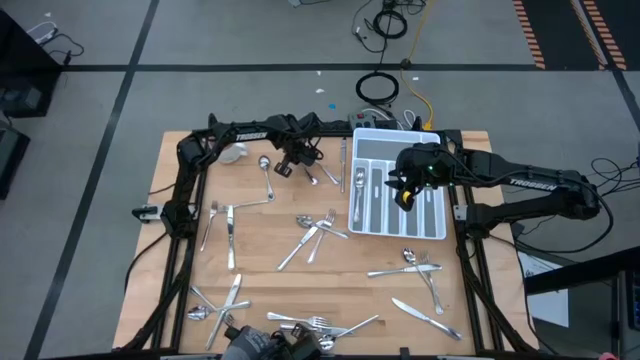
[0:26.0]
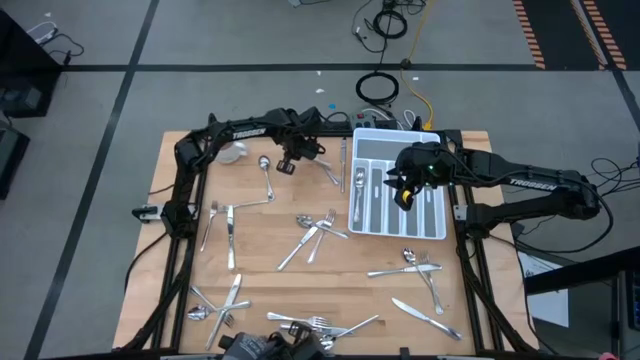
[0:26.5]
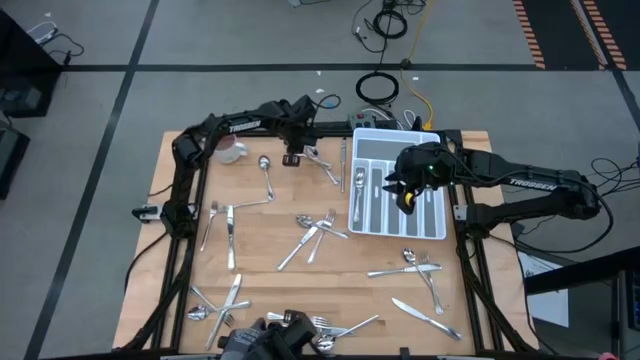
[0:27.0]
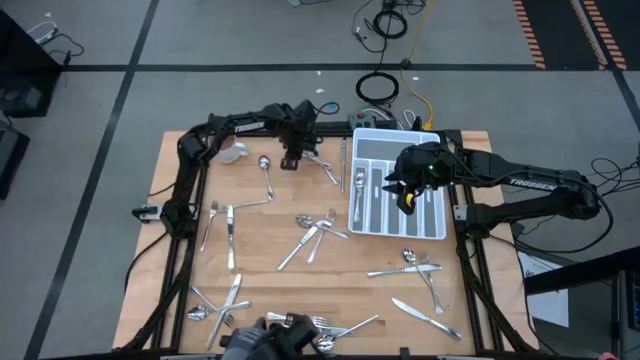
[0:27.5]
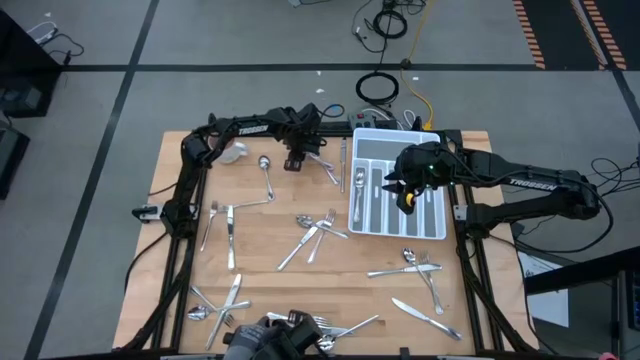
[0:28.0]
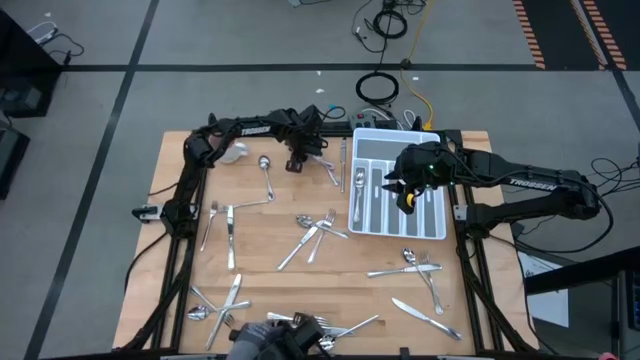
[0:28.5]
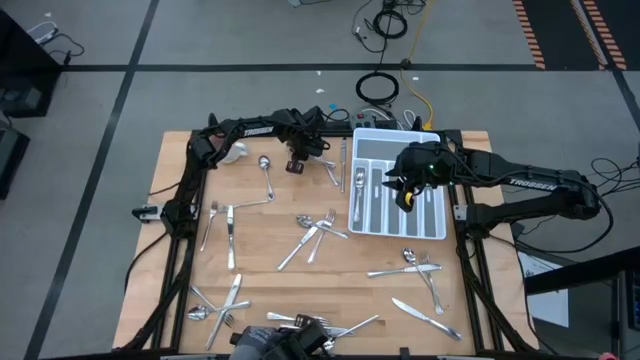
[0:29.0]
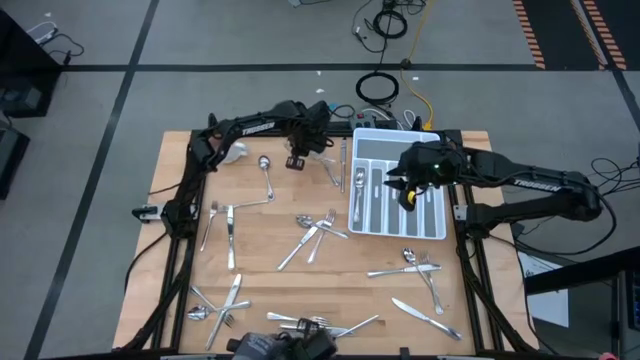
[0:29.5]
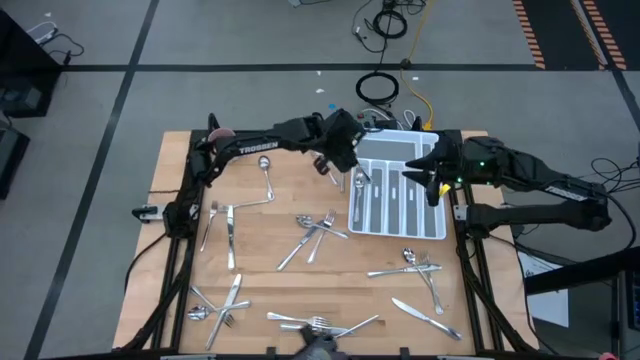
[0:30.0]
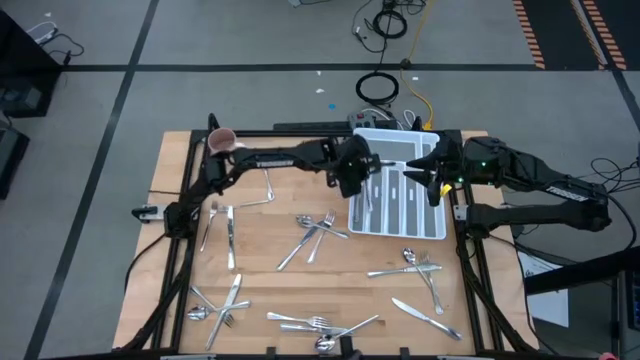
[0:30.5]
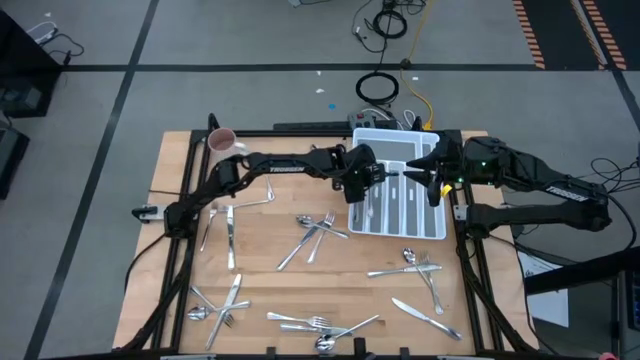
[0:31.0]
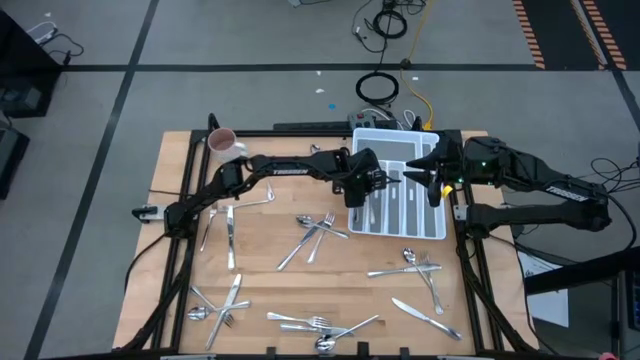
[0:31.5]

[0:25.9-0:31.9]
Task: Sort silverware
Put the silver fork into the silverware tray

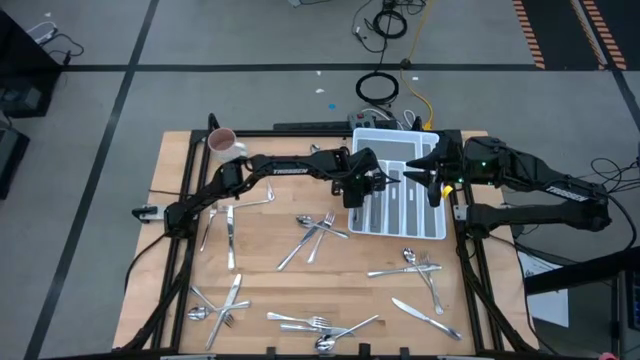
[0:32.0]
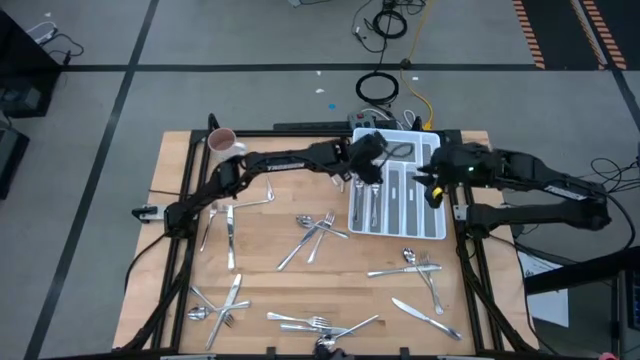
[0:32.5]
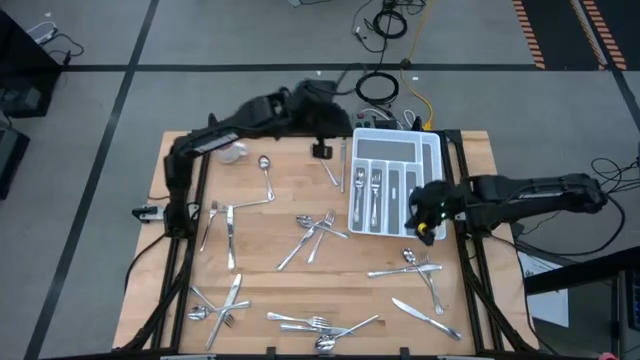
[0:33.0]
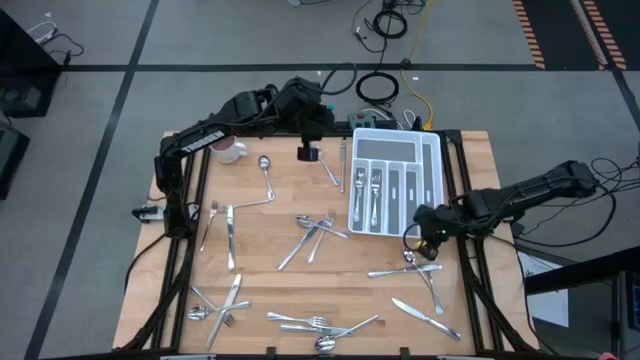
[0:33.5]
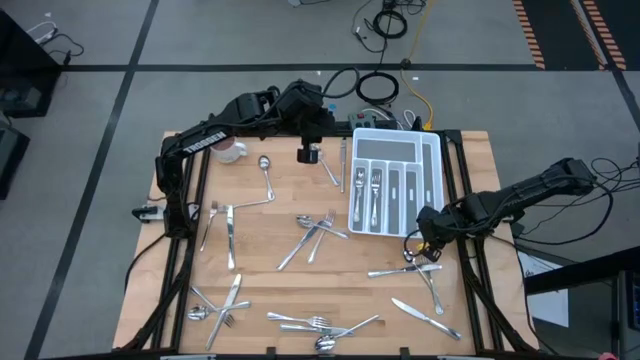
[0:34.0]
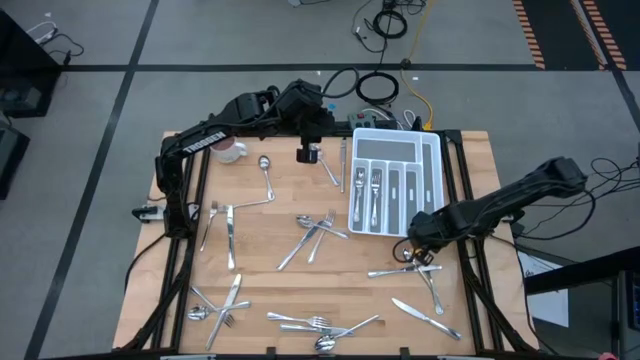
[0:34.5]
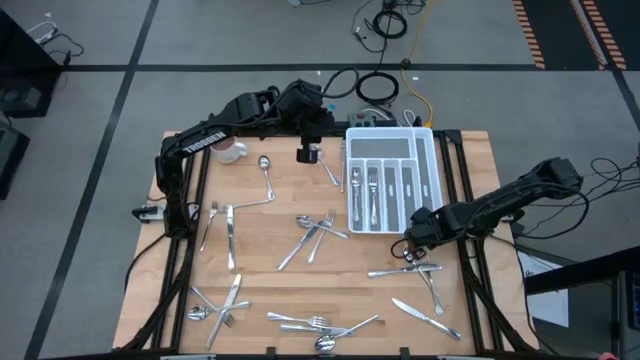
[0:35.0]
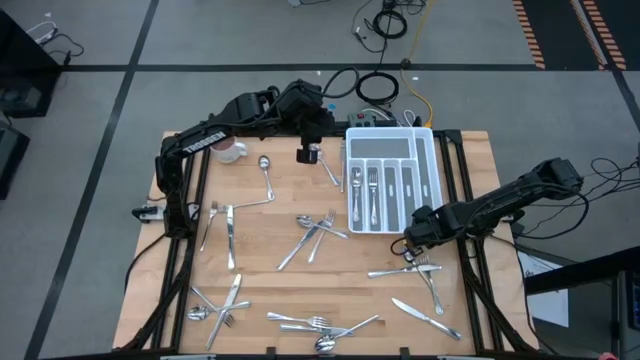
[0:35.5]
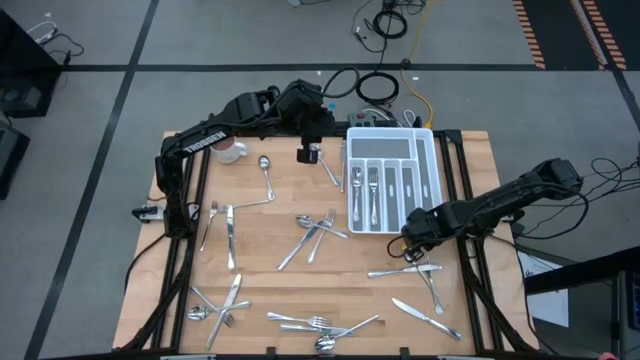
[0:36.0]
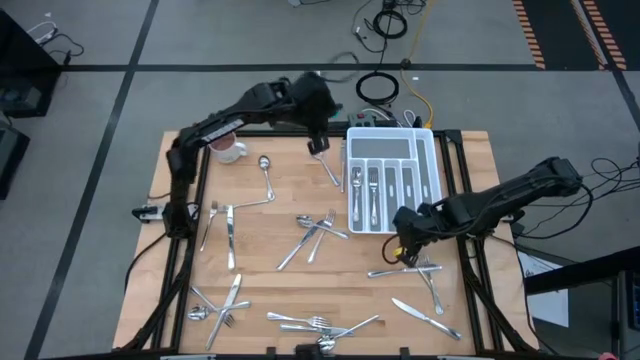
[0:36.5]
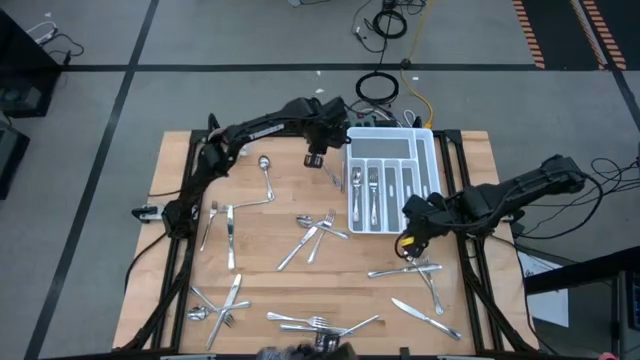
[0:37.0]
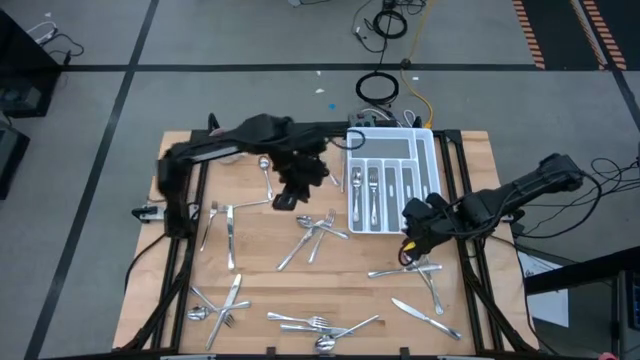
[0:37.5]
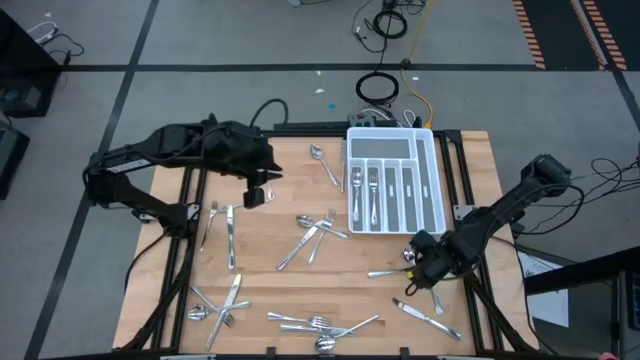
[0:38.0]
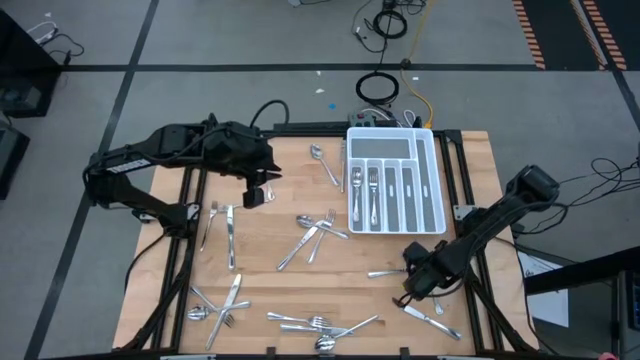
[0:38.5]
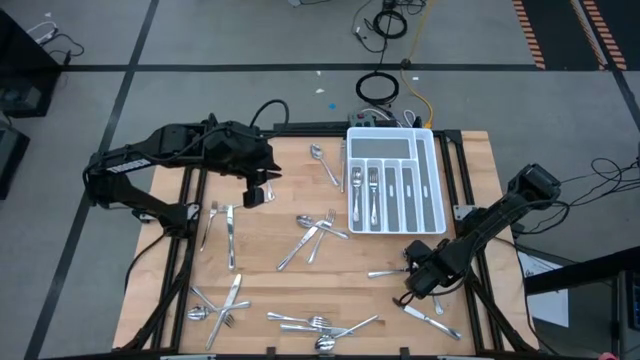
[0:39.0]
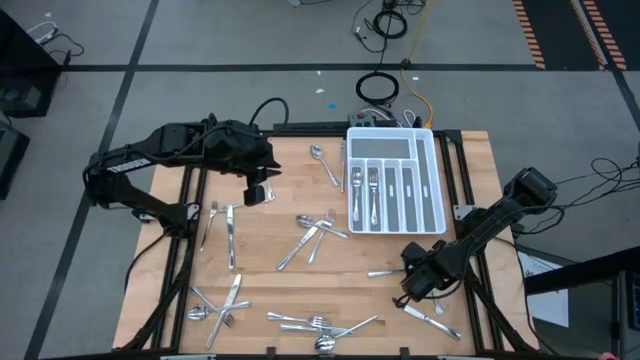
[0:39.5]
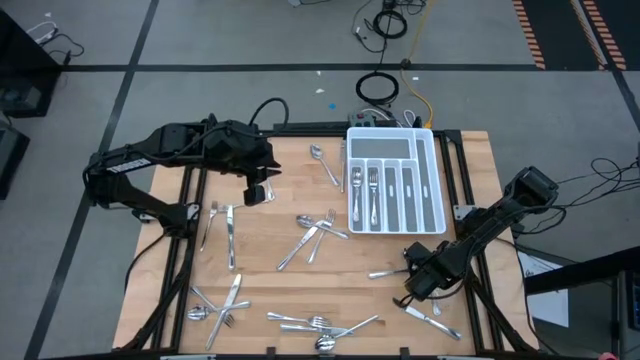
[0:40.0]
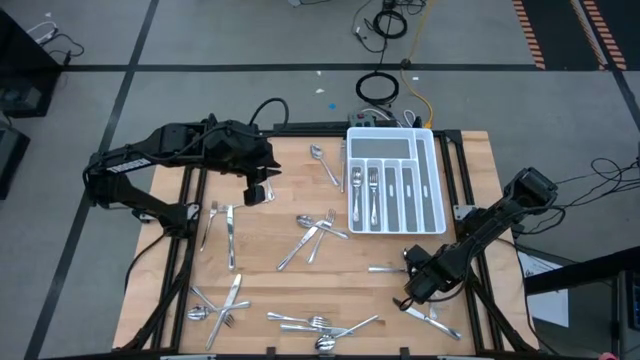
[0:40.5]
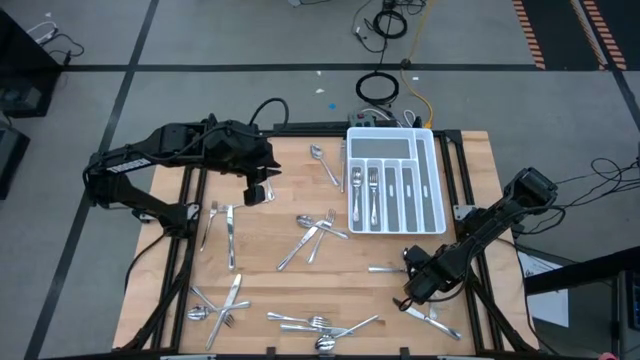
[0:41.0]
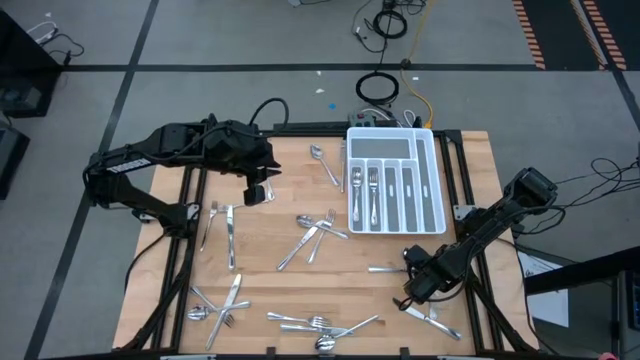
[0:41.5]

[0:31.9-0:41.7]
Put the silver spoon into the silverware tray

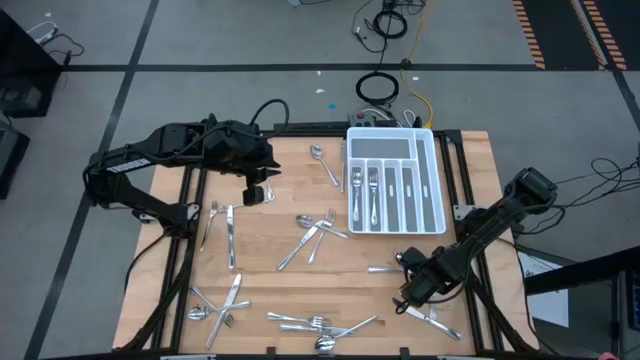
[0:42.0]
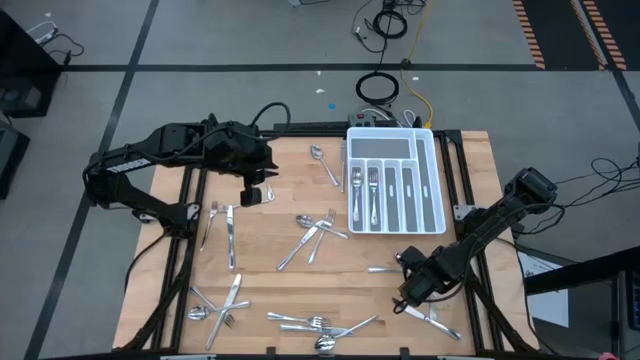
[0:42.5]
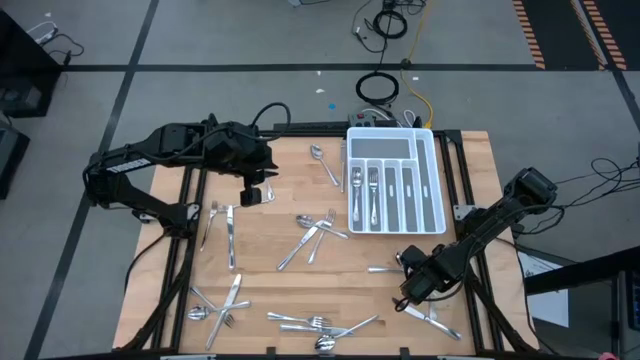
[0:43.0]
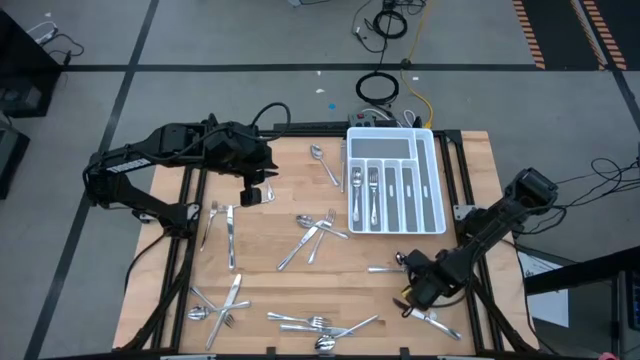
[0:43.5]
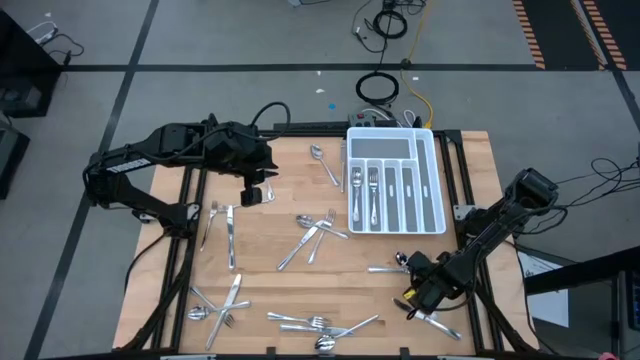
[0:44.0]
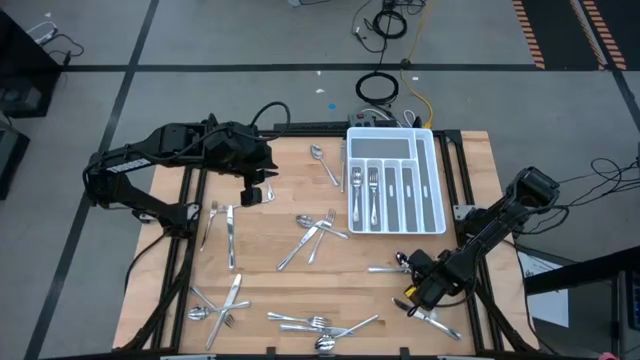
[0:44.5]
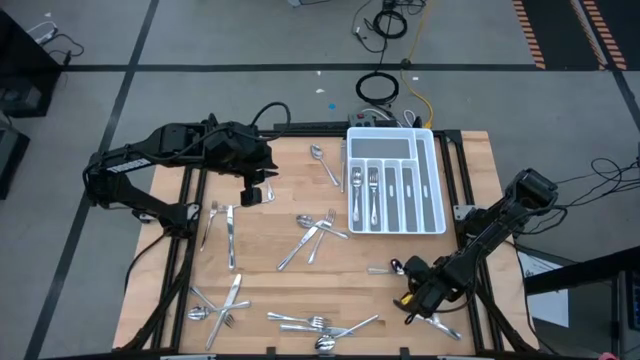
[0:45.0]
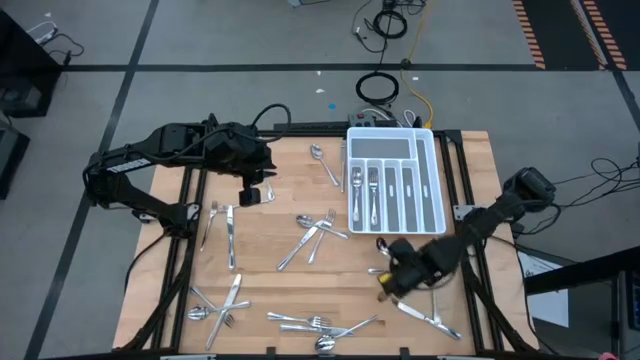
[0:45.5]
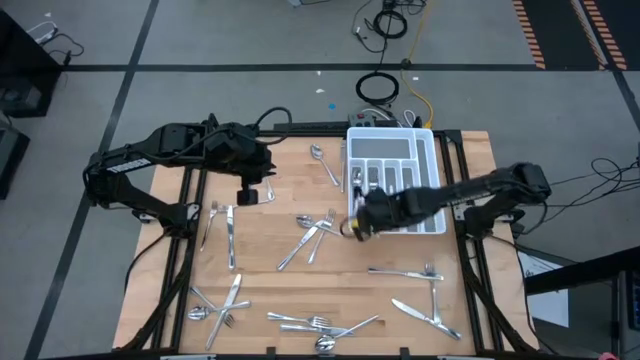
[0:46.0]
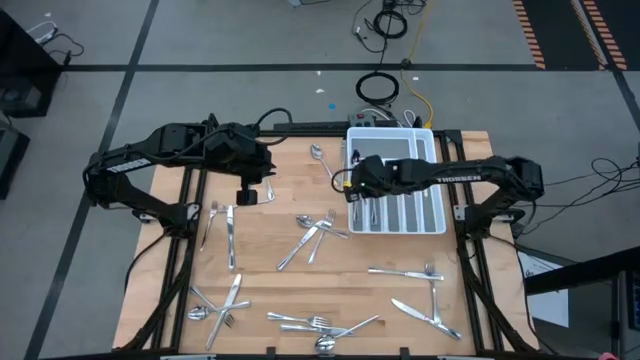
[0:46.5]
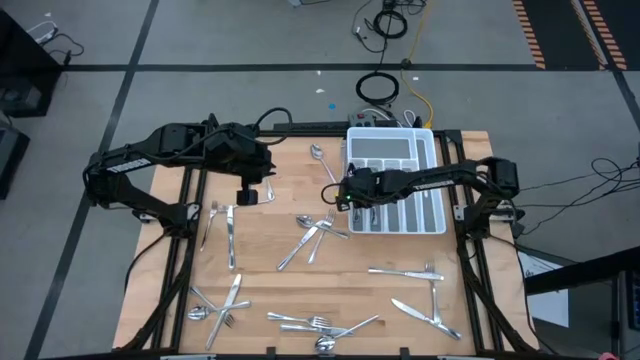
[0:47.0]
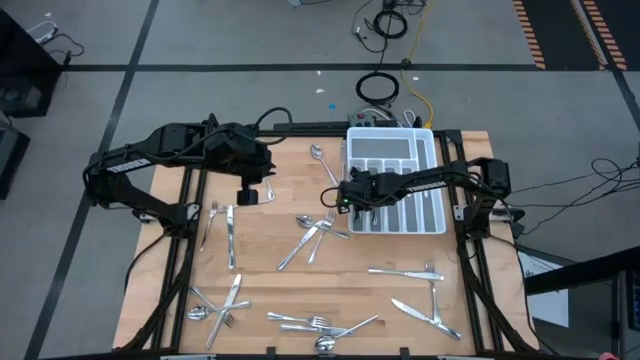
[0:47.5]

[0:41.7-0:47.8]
Put the silver spoon into the silverware tray
